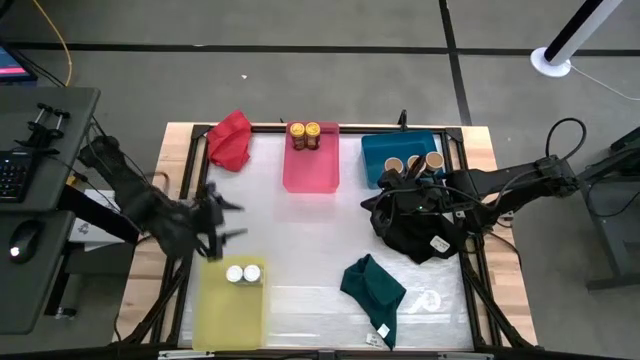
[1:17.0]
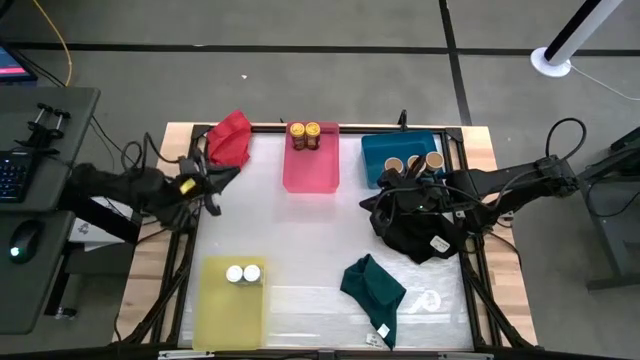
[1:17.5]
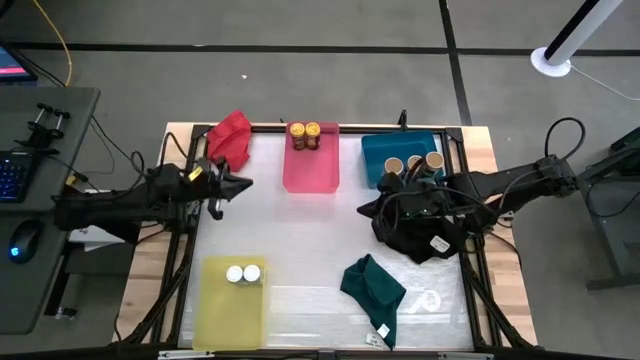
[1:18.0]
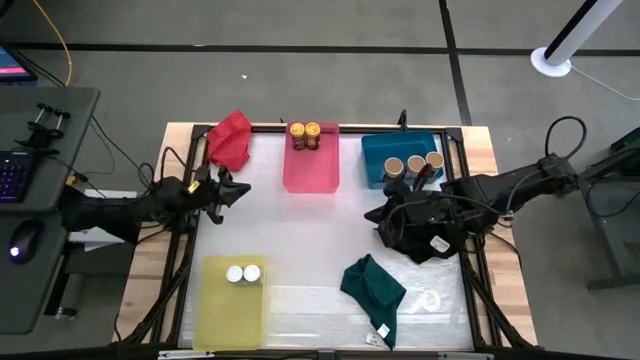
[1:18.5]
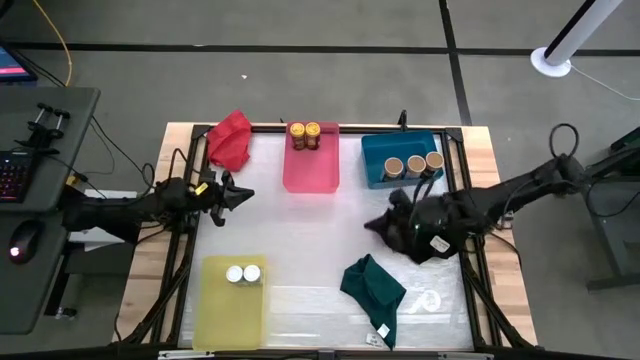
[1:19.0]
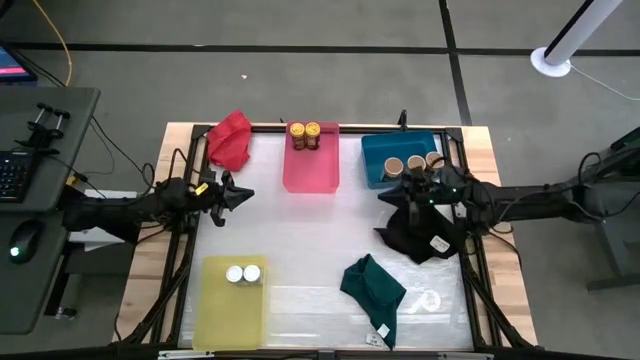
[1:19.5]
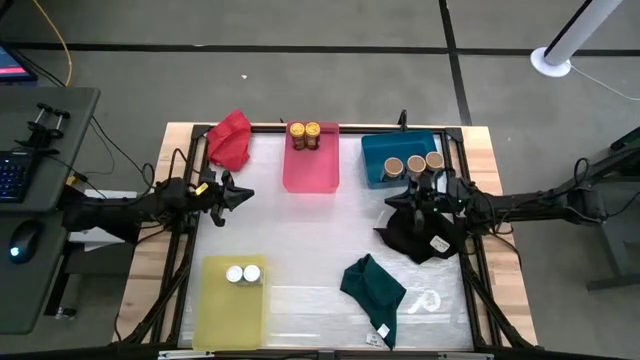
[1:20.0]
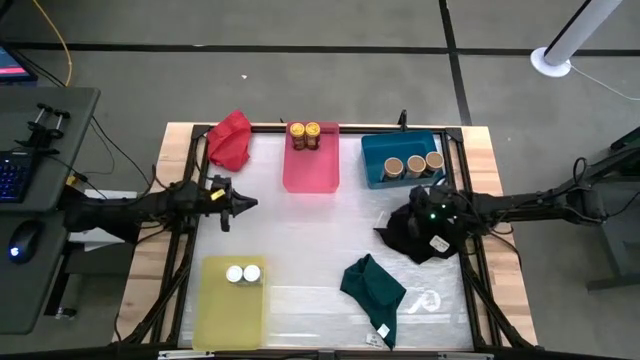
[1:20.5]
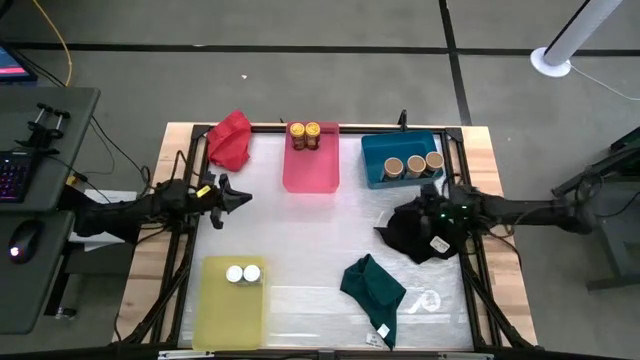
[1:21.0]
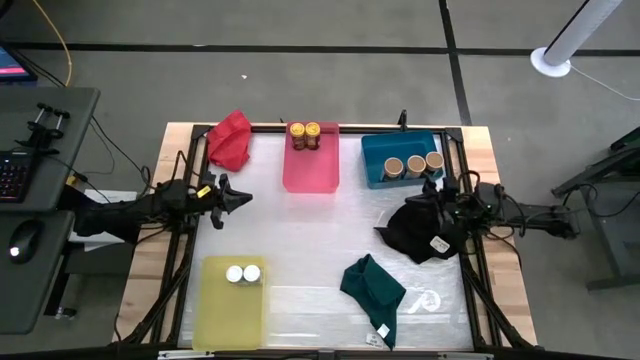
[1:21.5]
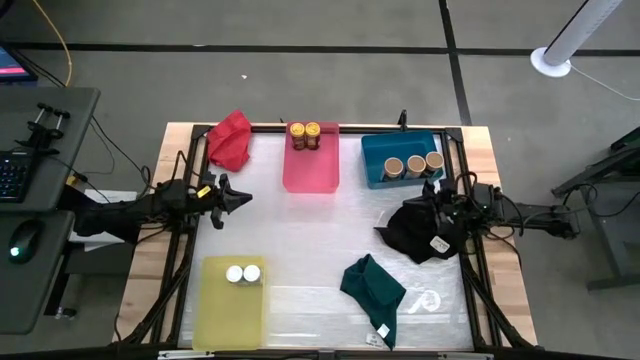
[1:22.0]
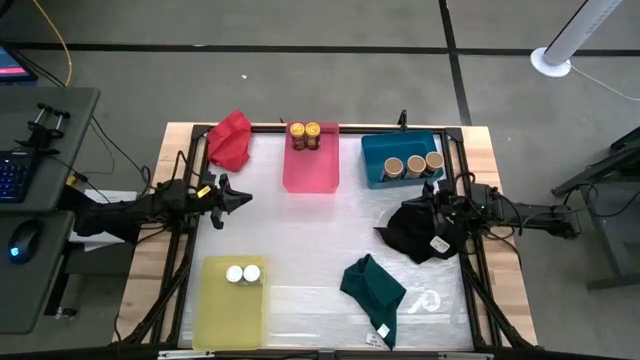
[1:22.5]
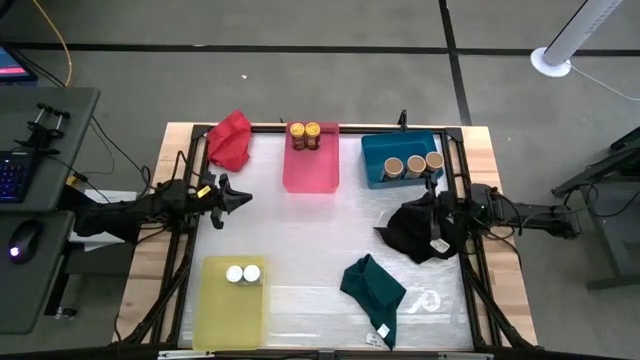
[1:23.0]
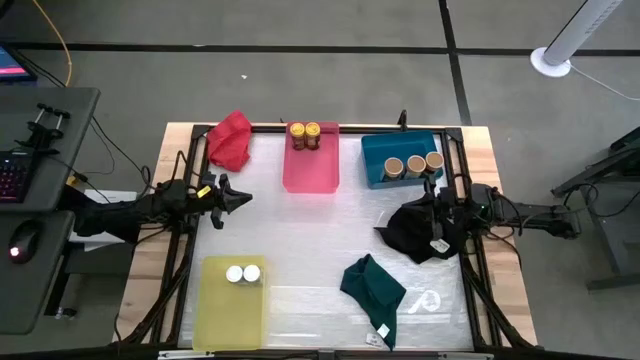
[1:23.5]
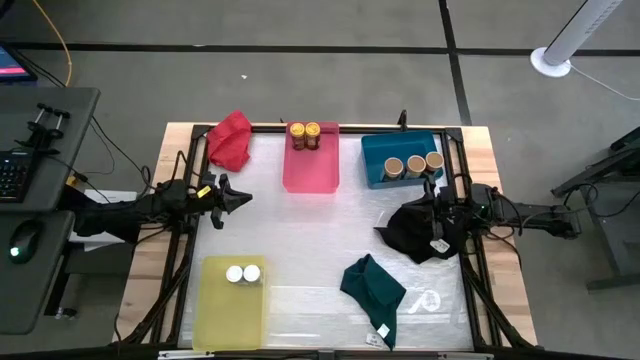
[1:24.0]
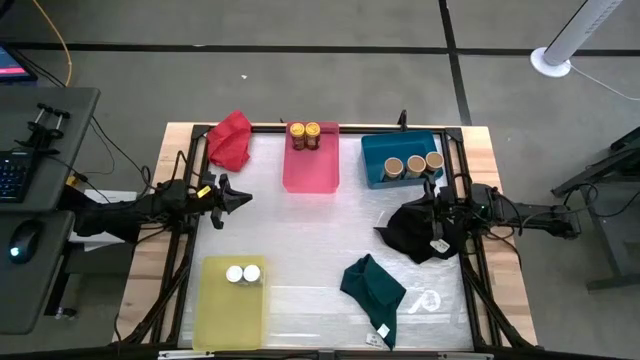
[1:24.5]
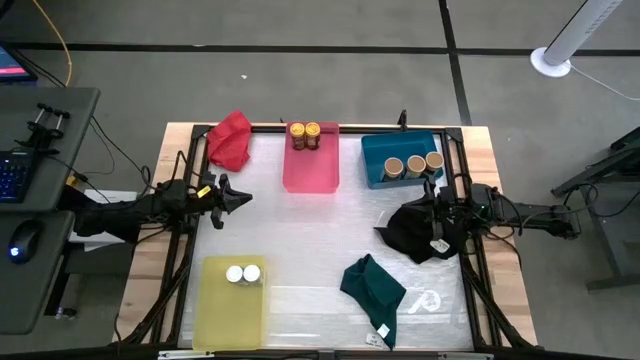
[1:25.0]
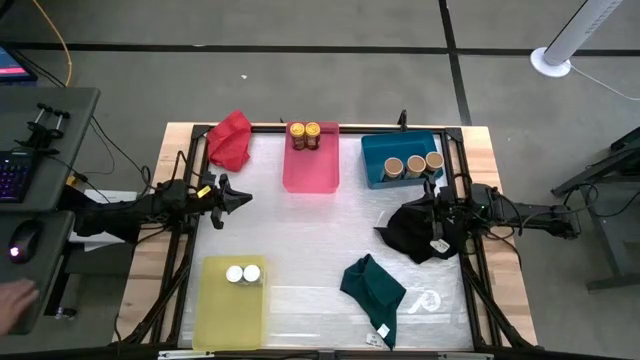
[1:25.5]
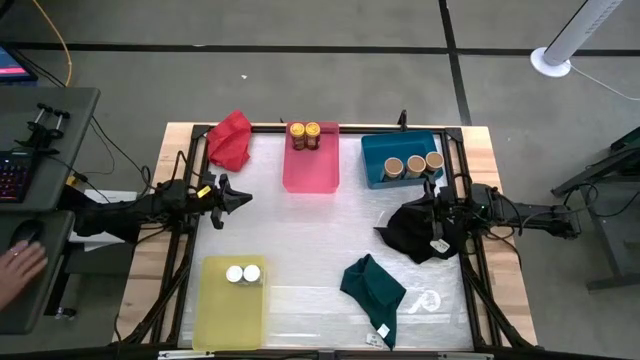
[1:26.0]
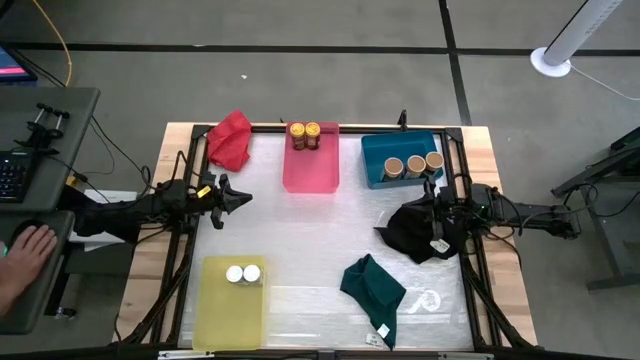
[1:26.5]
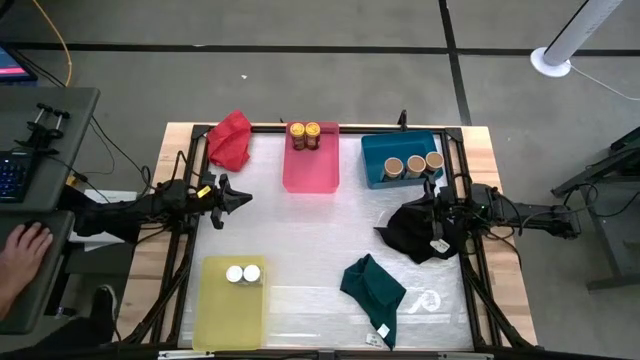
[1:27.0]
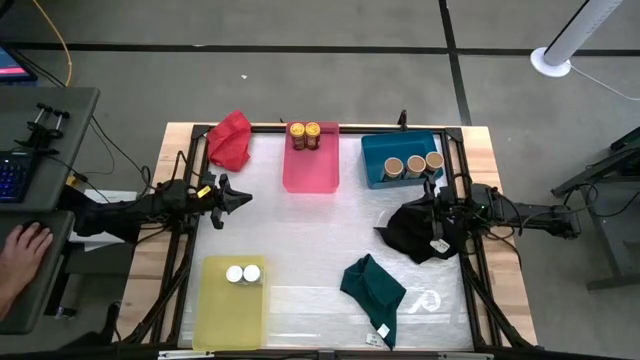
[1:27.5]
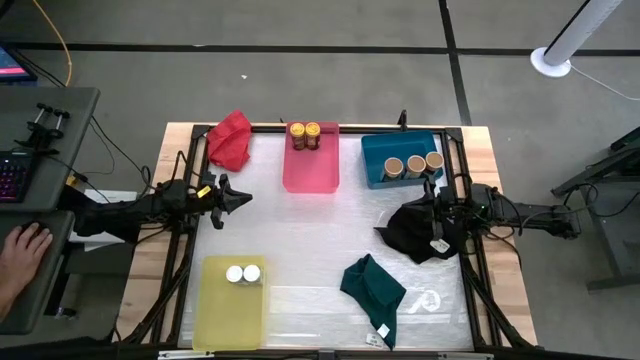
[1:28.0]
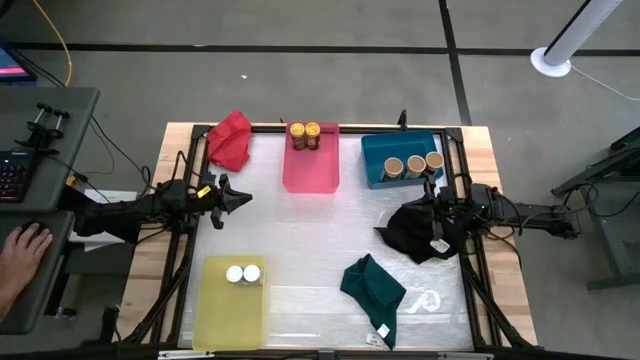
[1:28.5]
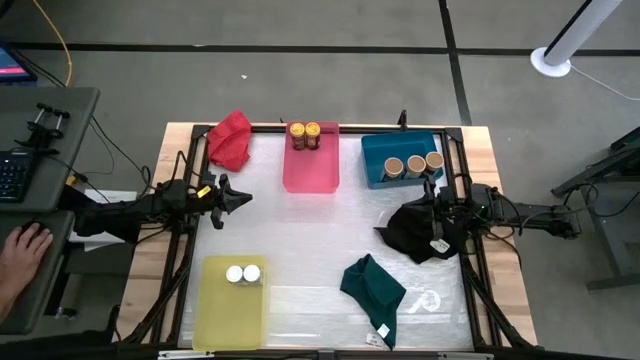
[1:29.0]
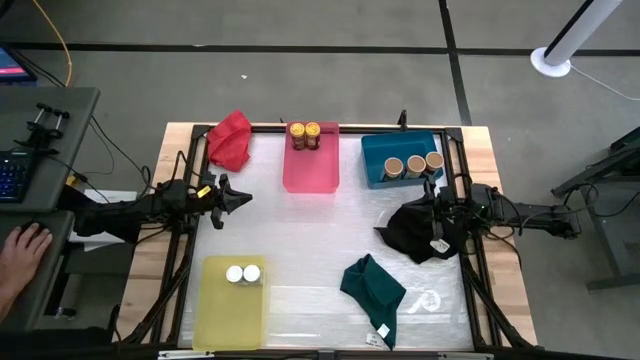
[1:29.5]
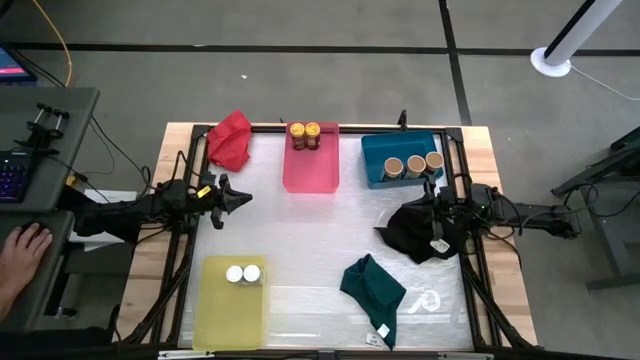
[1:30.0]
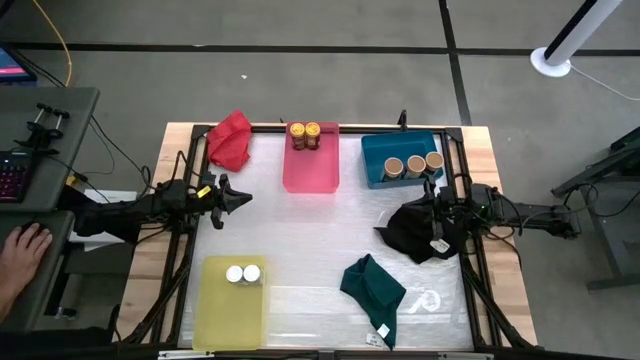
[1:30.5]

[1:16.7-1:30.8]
Task: Sort spices by type
Return to home position

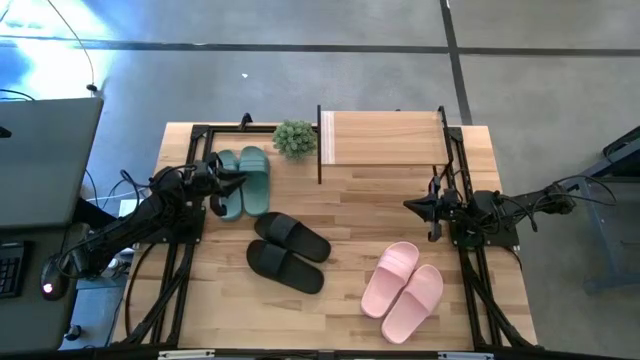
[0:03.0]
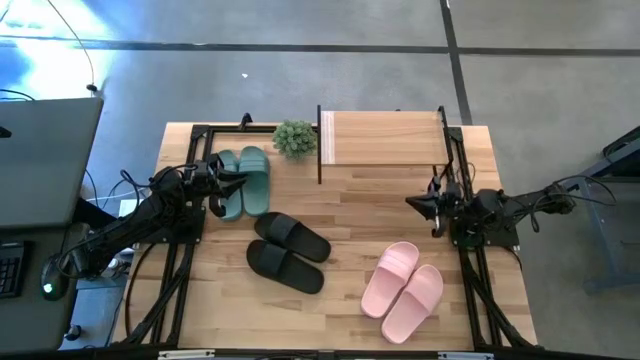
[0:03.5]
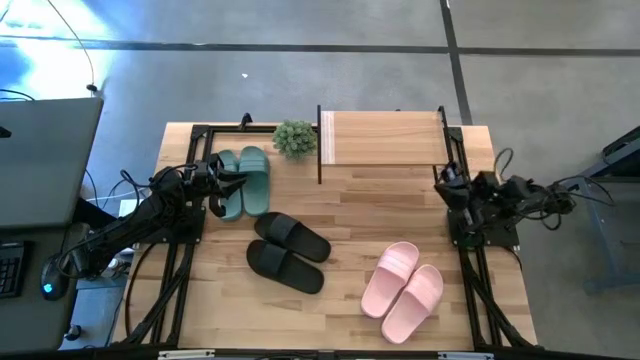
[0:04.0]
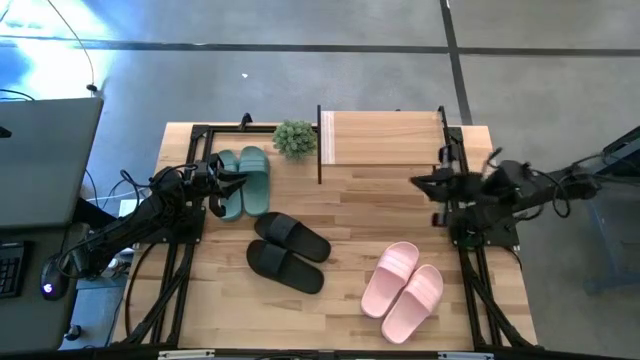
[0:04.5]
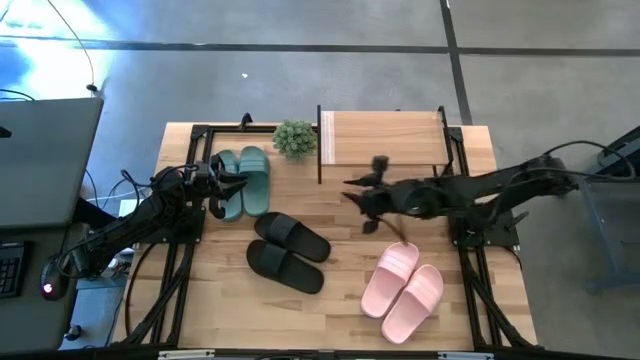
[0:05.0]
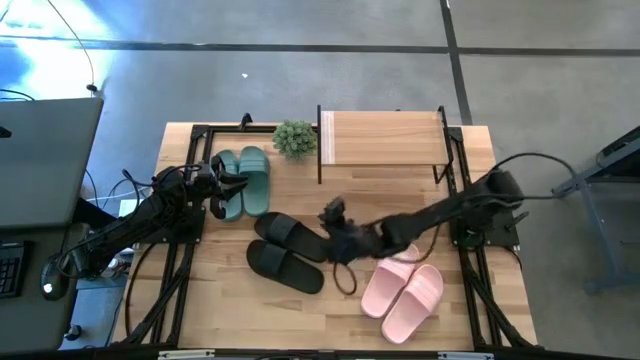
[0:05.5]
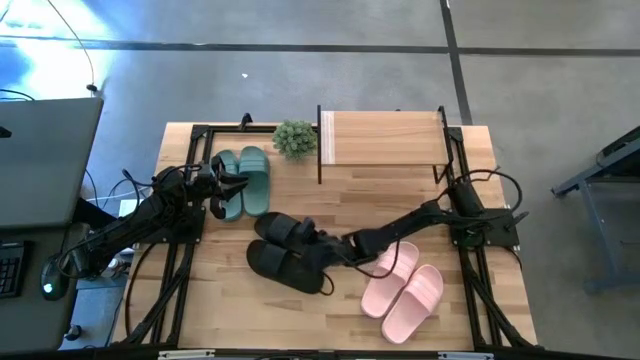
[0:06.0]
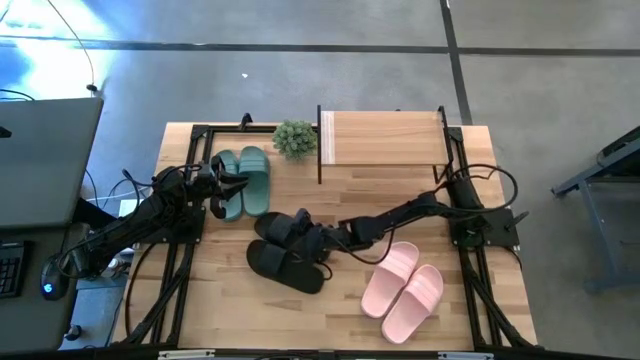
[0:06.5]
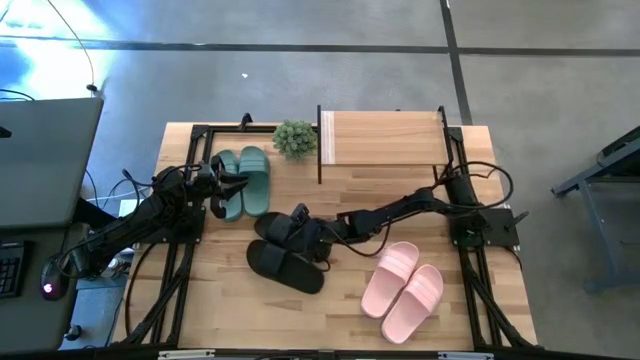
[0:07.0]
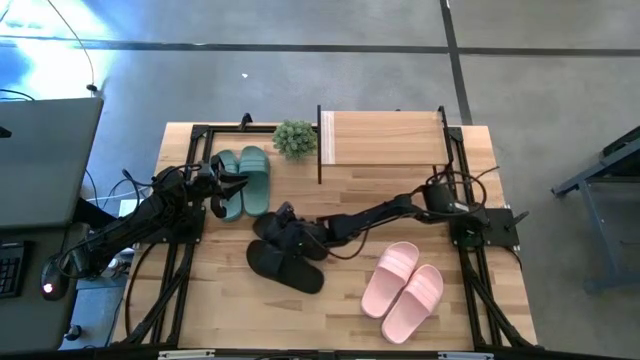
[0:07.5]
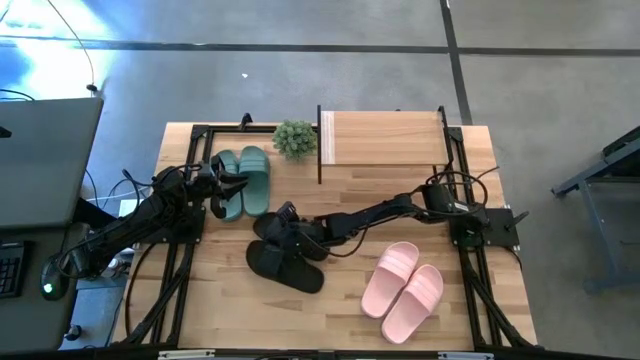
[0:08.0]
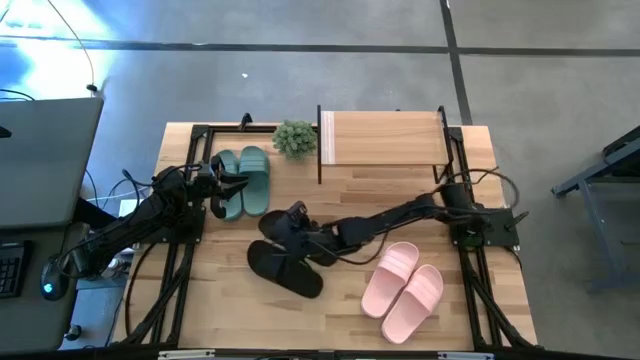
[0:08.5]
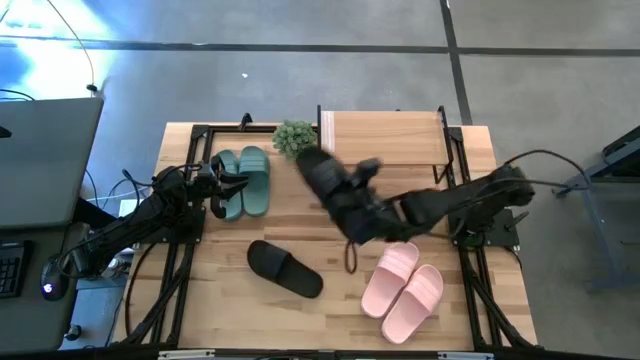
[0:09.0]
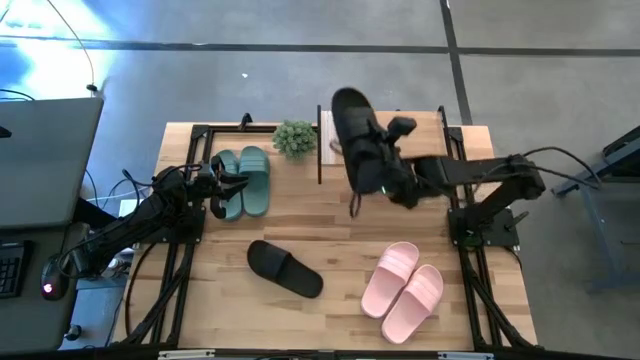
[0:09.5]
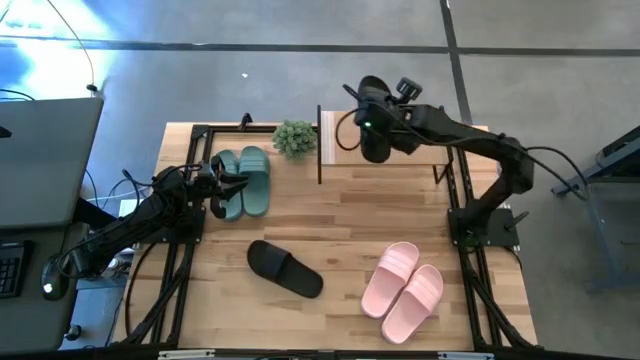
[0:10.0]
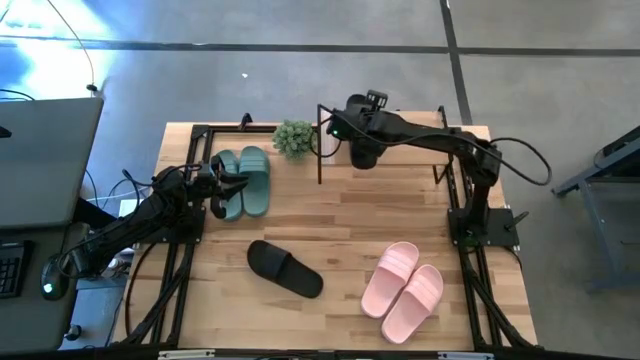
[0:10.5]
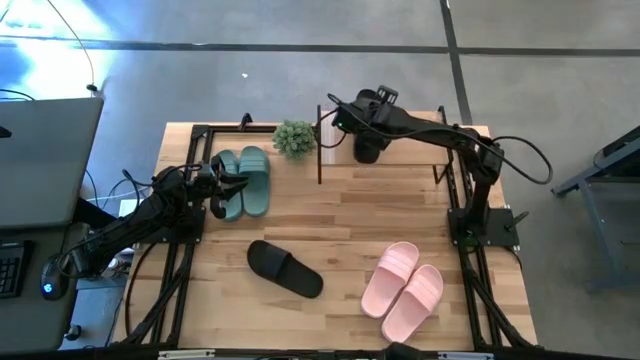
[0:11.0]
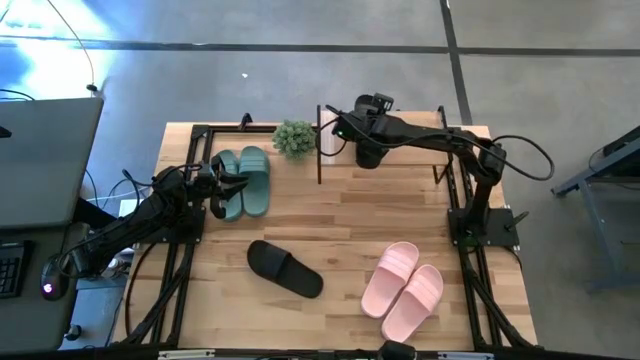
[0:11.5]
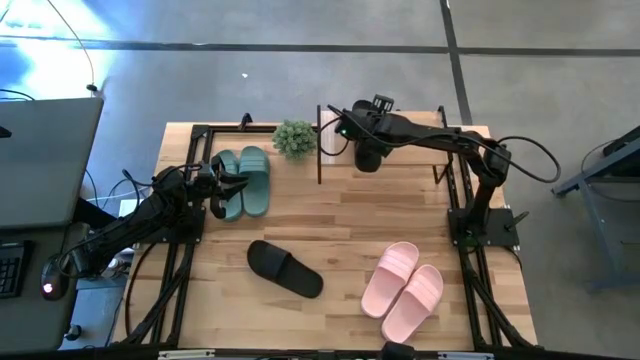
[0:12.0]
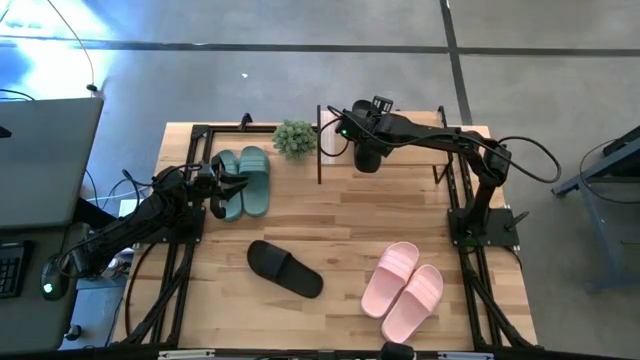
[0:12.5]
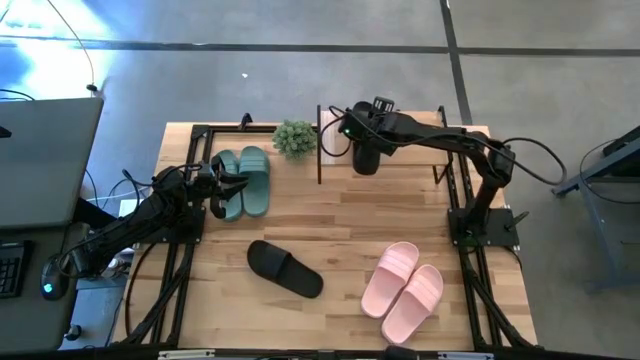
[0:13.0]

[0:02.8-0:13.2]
Task: Pick and place slides into the shelf
Put the right black slide on the shelf
